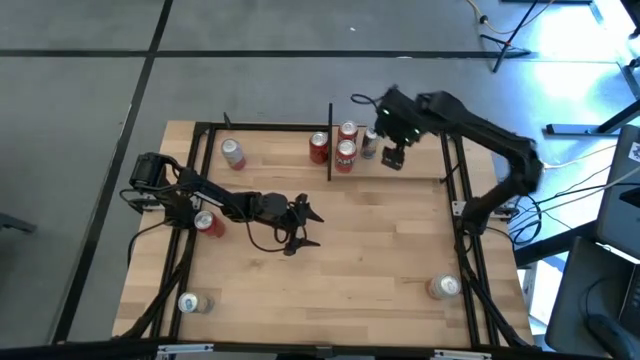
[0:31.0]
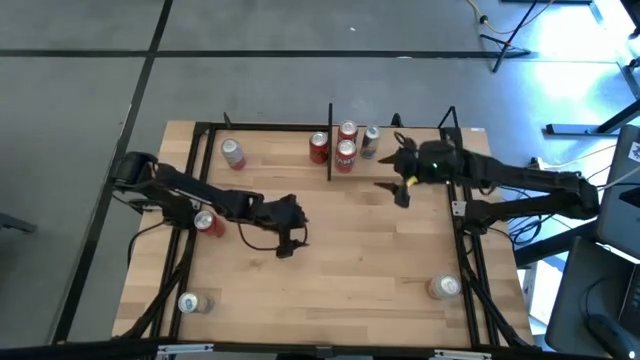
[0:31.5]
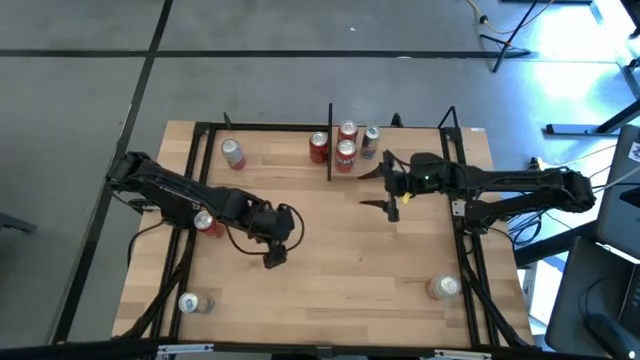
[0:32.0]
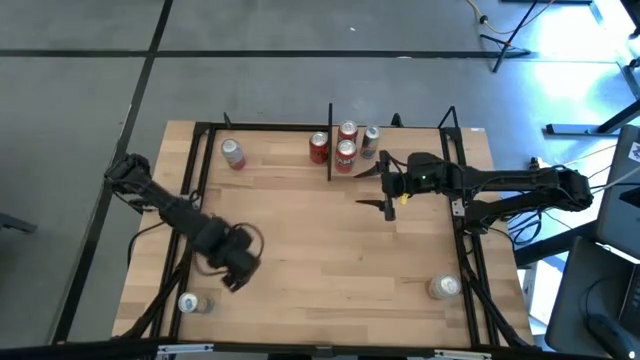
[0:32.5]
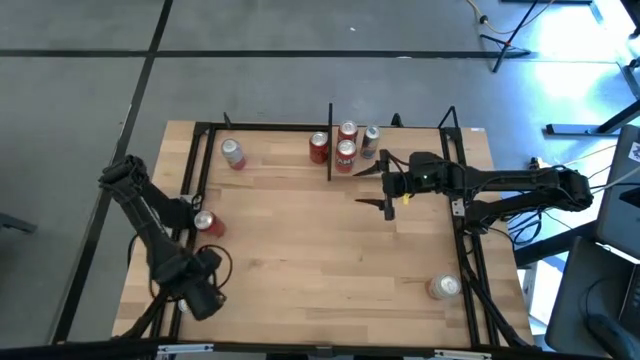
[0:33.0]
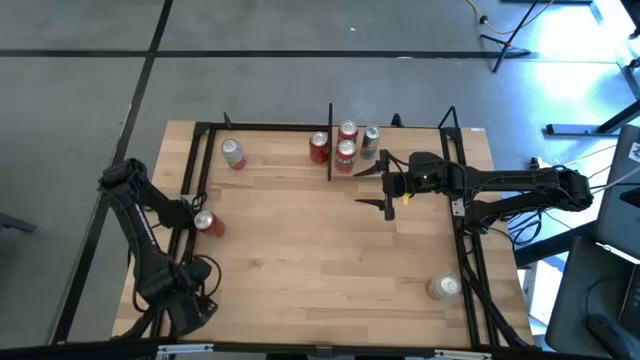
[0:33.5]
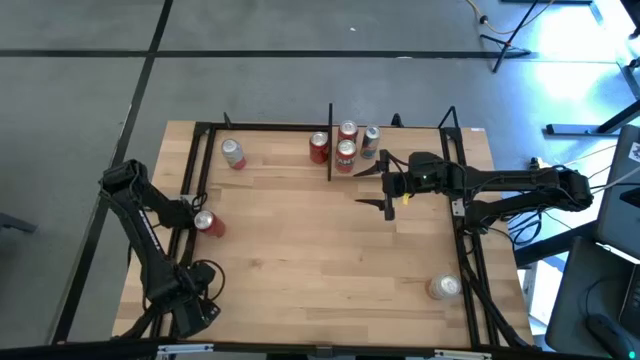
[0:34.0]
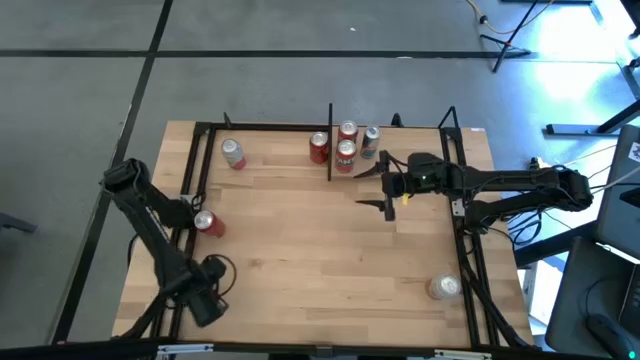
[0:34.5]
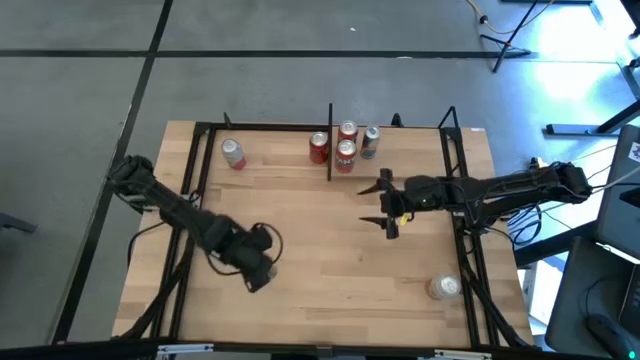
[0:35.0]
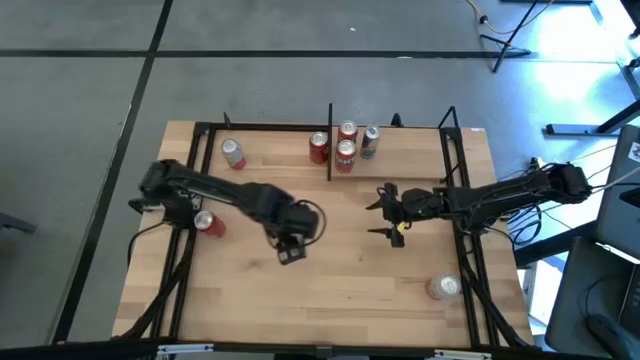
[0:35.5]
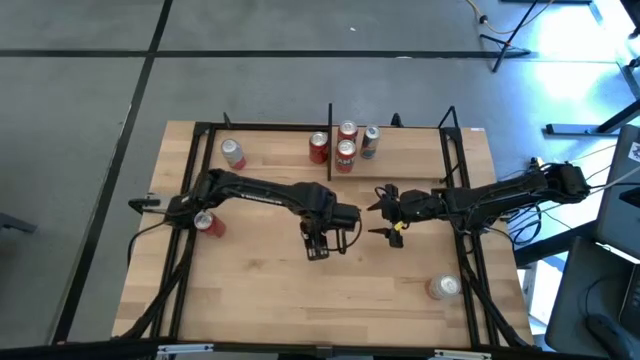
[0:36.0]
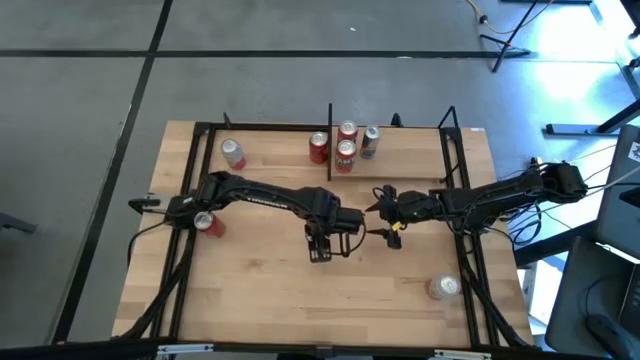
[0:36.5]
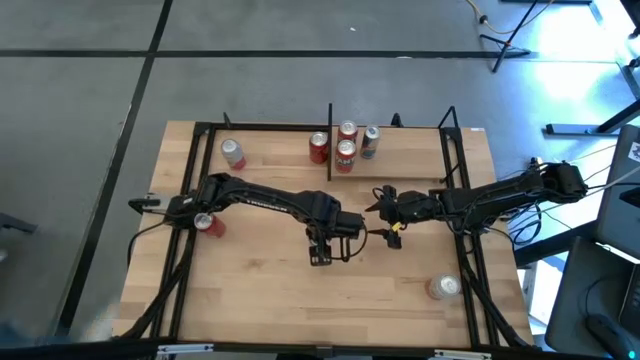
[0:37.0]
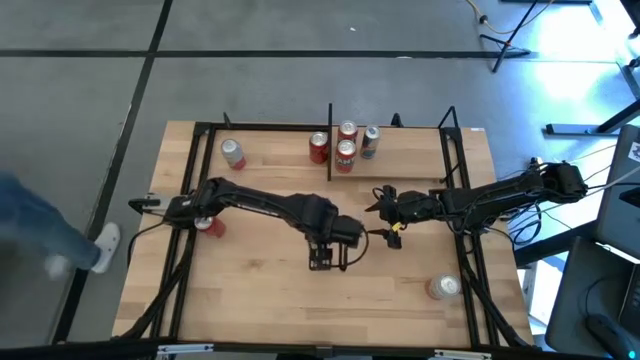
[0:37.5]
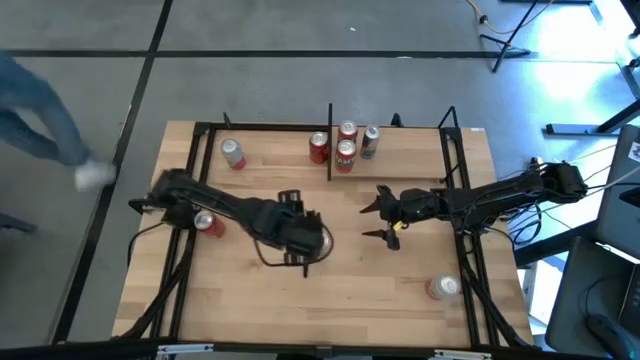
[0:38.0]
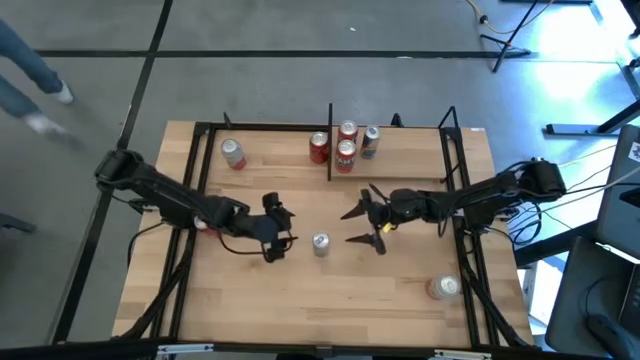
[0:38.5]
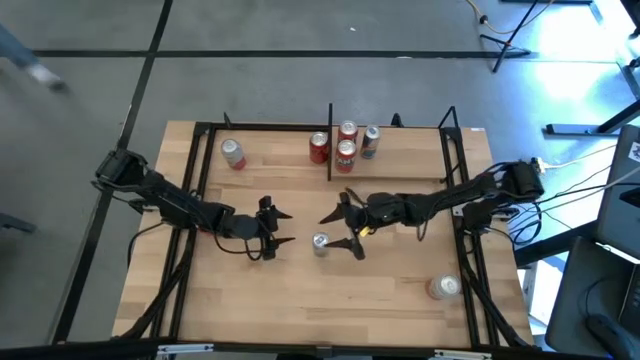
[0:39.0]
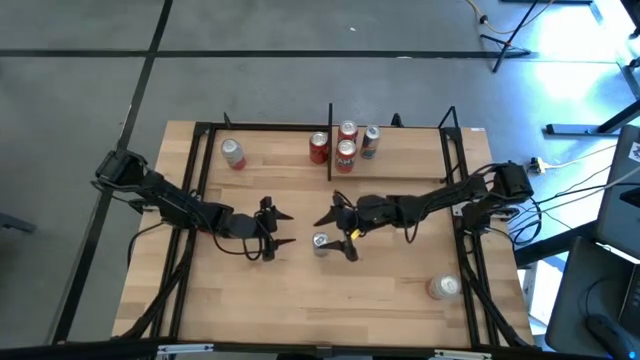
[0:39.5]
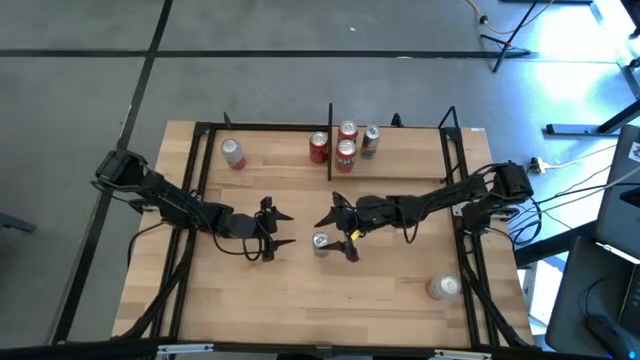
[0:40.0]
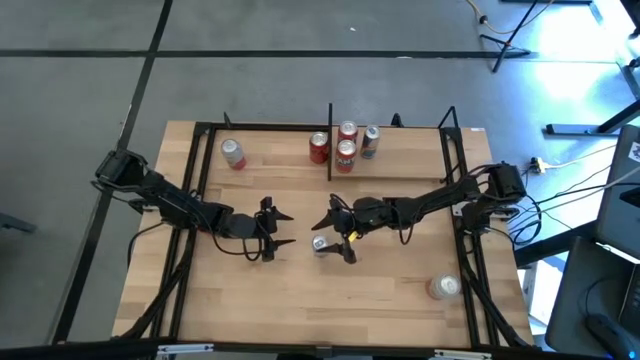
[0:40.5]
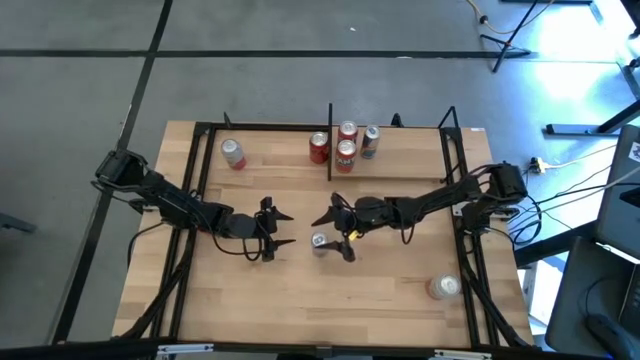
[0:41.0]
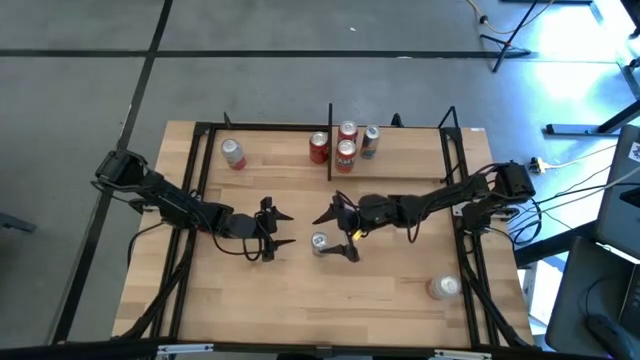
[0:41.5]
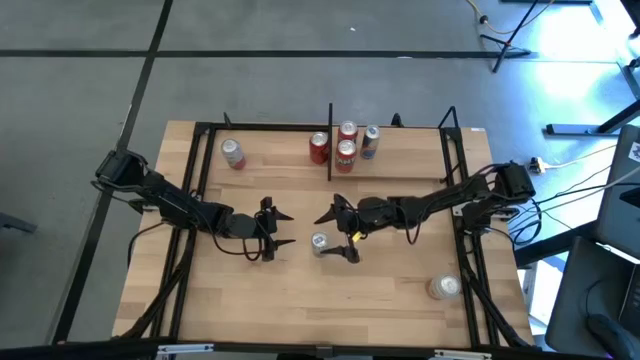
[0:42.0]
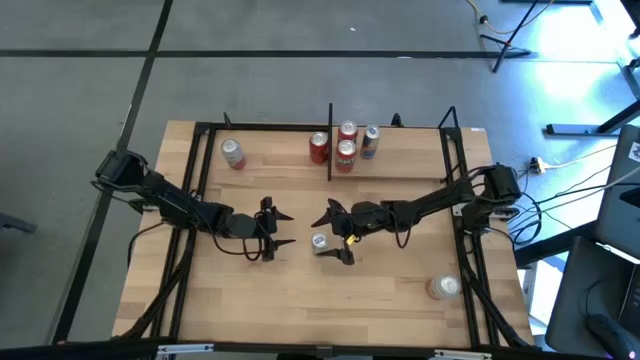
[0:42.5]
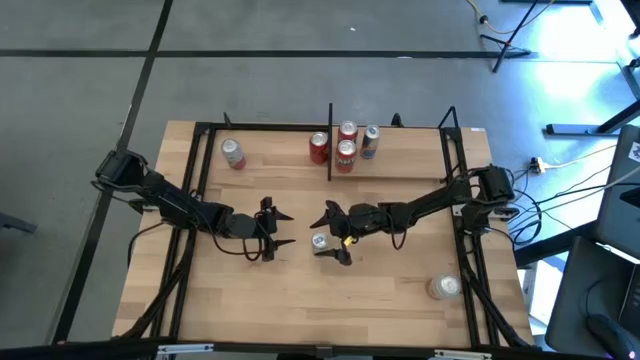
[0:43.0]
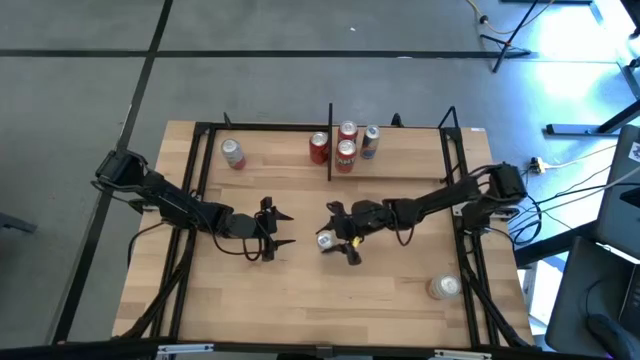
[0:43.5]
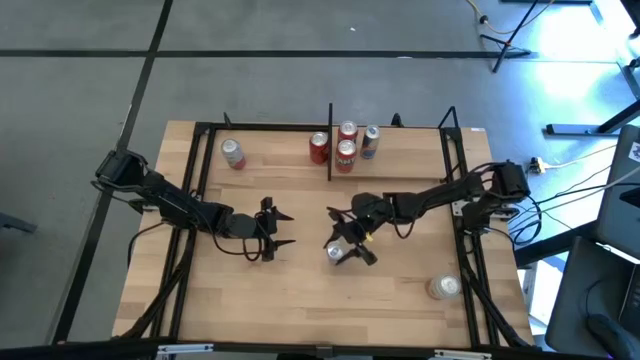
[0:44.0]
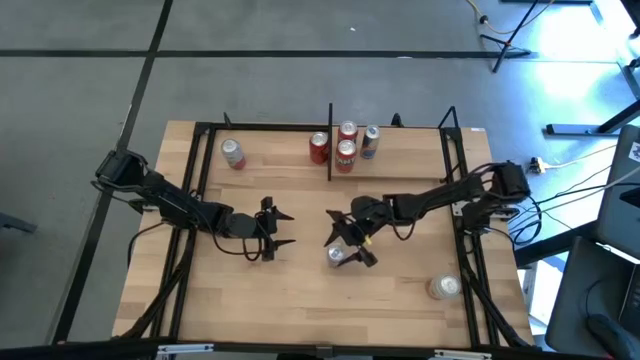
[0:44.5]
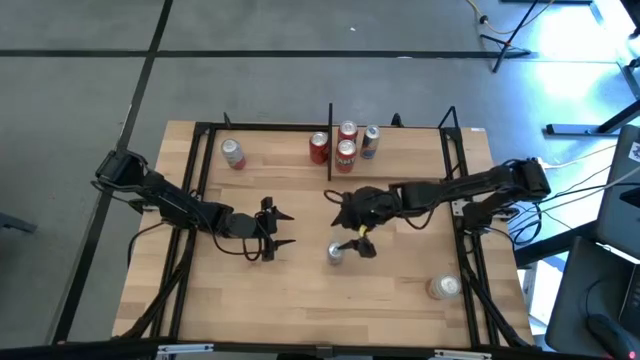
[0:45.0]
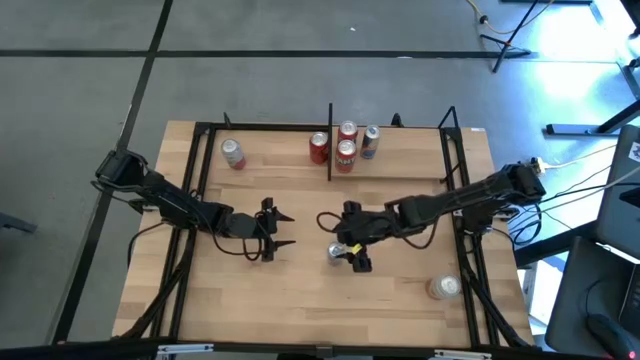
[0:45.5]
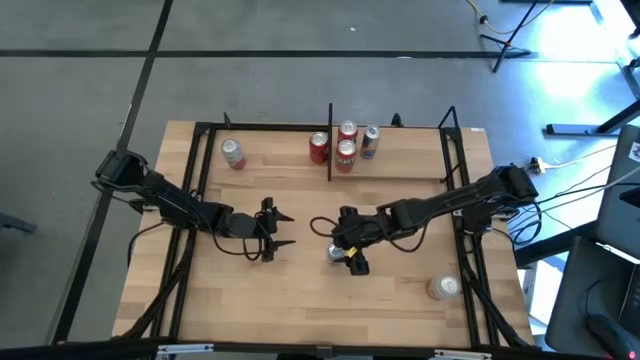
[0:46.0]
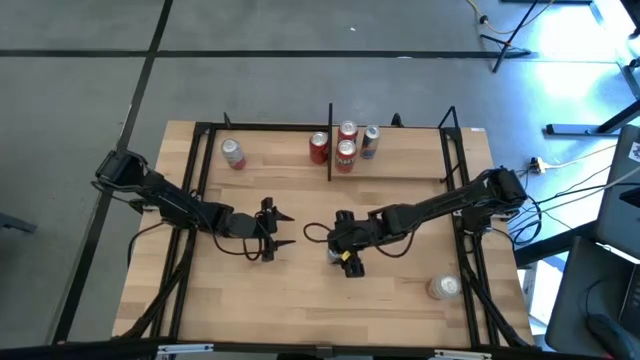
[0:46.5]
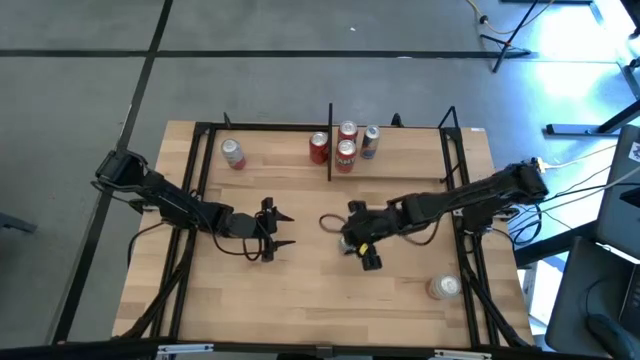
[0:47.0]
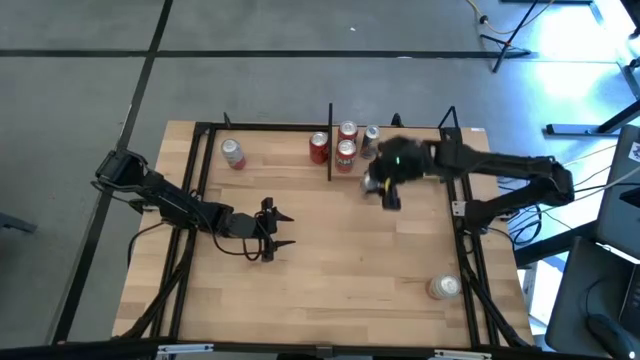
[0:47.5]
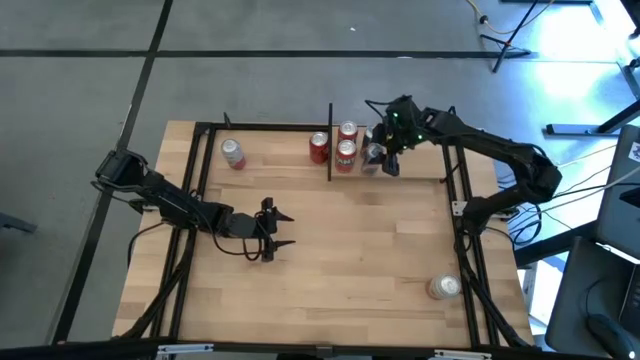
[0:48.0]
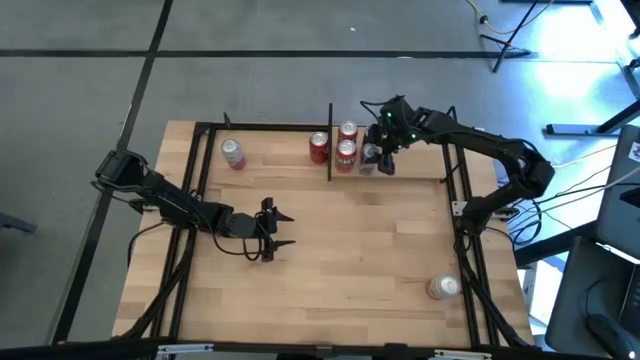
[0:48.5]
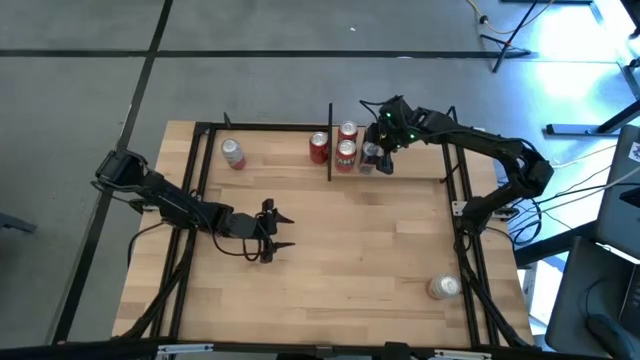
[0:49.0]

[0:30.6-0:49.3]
Task: Place canned beverage on shelf
Put the blue soda can on the shelf aligned with the other blue soda can

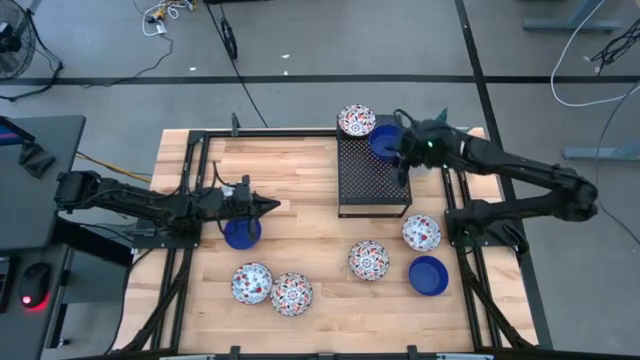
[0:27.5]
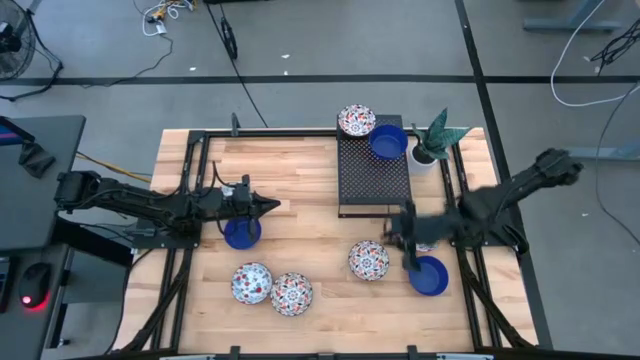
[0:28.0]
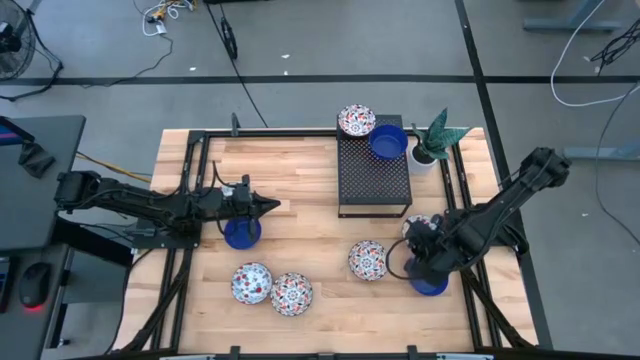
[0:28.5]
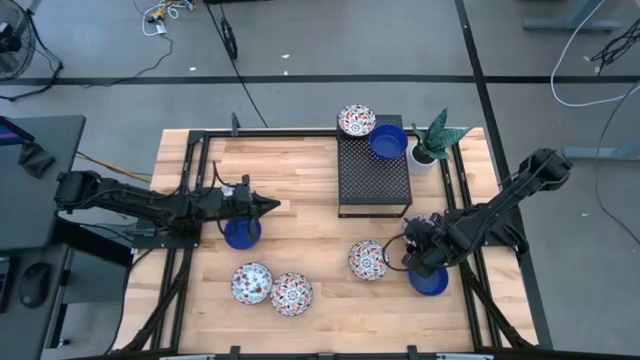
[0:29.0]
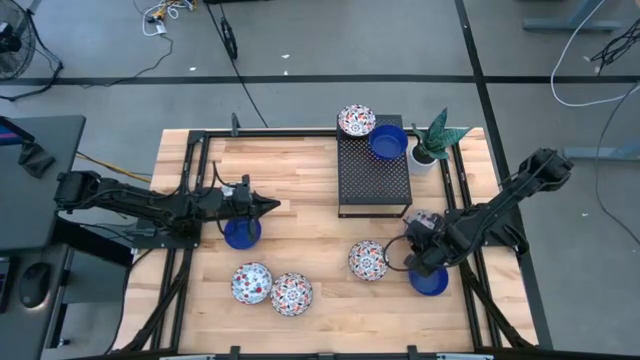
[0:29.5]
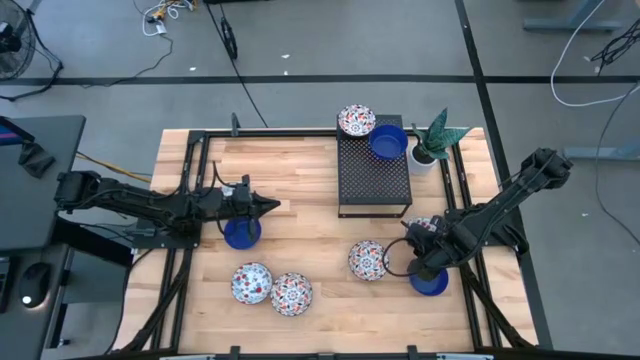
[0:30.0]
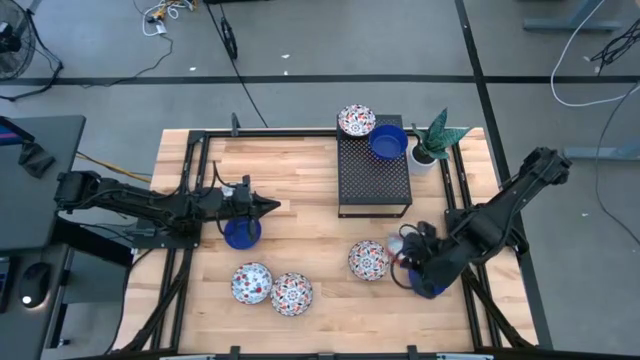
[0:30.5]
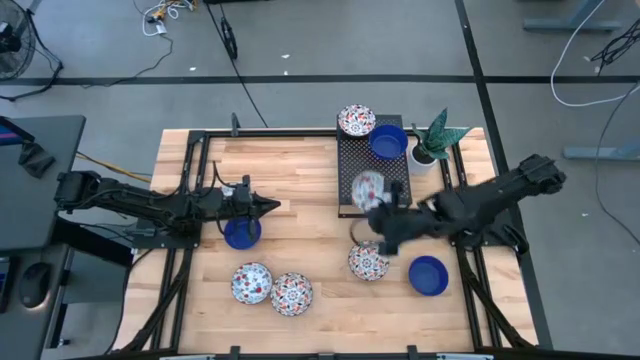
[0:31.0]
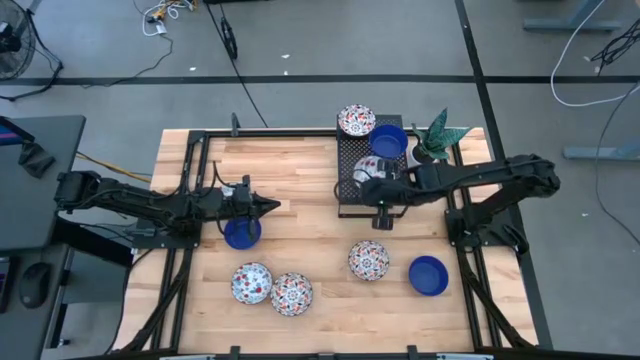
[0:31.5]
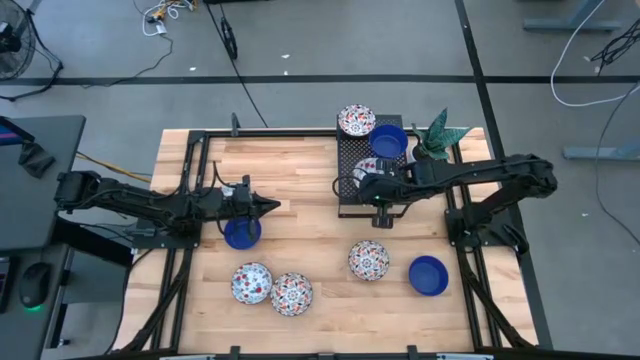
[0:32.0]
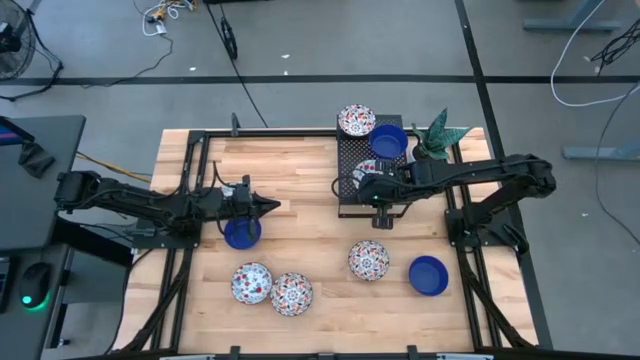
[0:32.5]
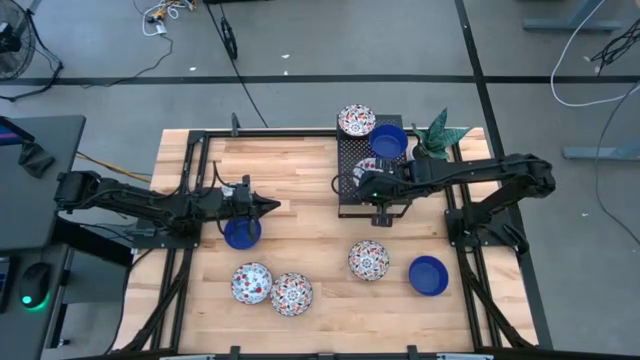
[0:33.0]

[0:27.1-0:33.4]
Task: Pick & Place Mini bowls
Put the right red patterned bowl on the shelf
